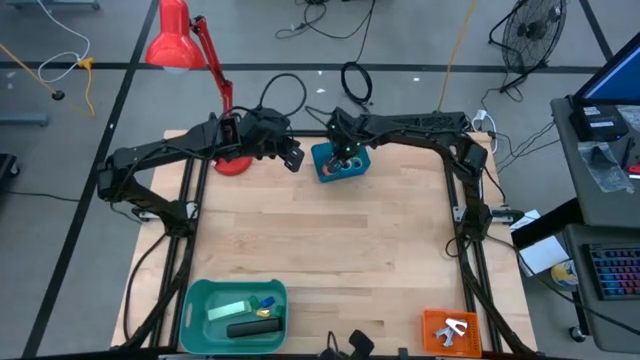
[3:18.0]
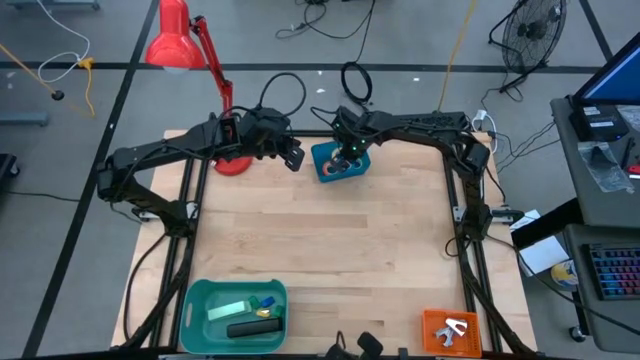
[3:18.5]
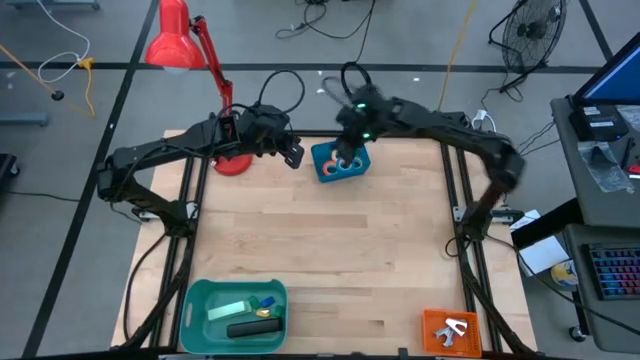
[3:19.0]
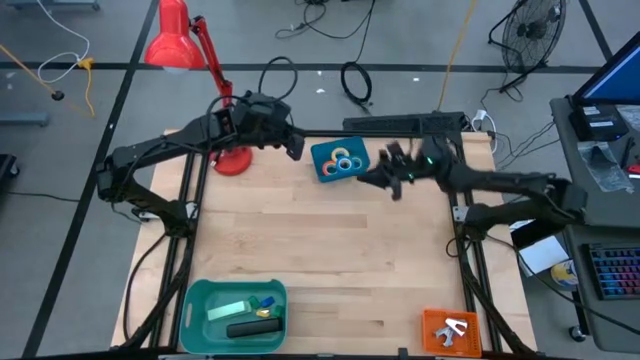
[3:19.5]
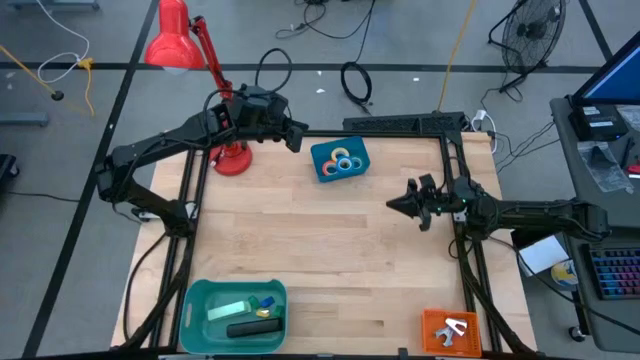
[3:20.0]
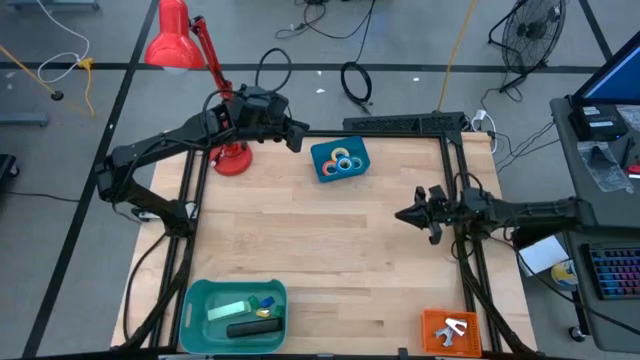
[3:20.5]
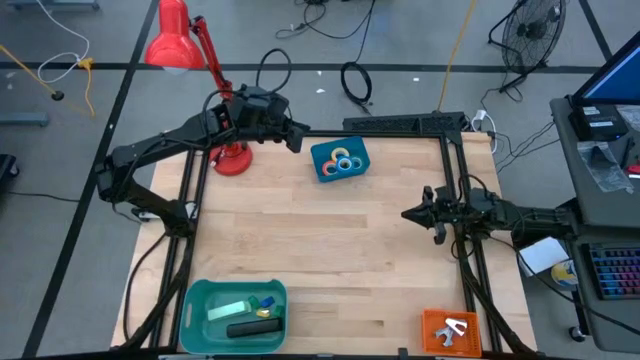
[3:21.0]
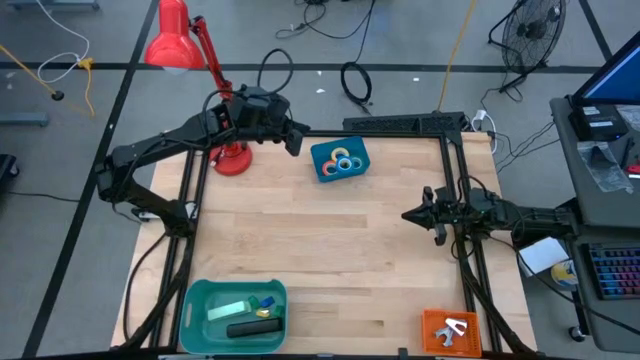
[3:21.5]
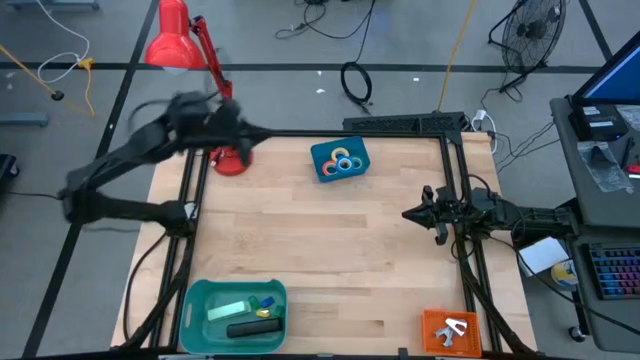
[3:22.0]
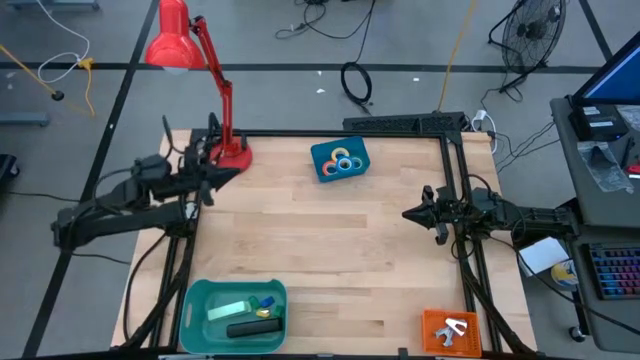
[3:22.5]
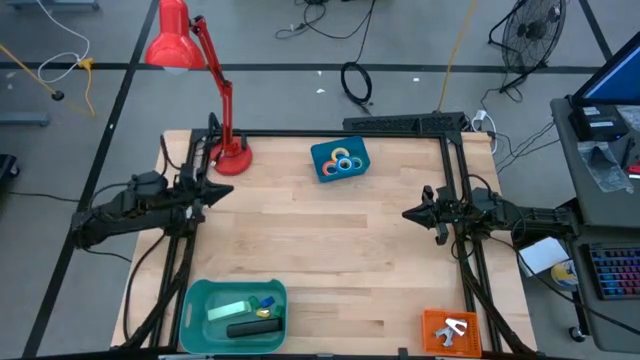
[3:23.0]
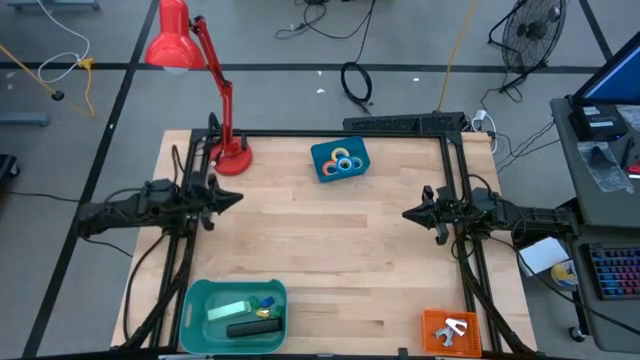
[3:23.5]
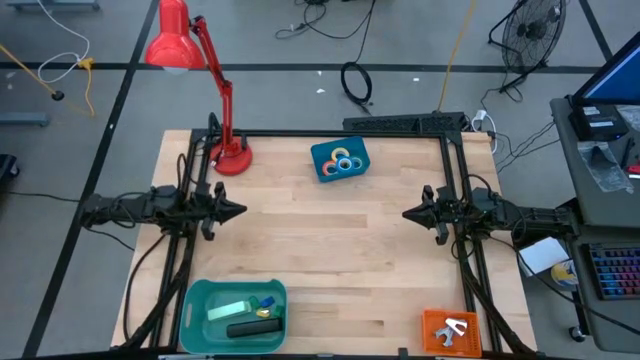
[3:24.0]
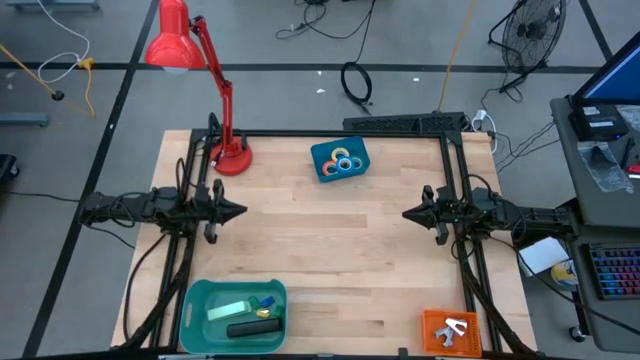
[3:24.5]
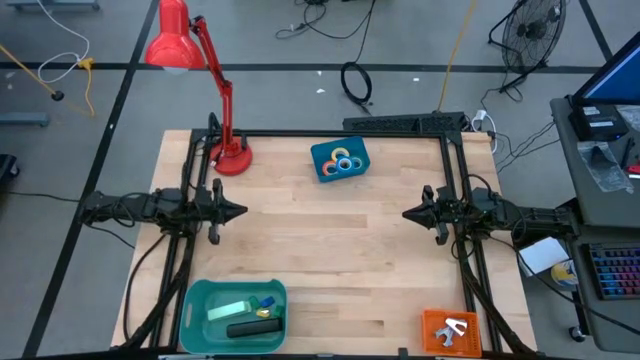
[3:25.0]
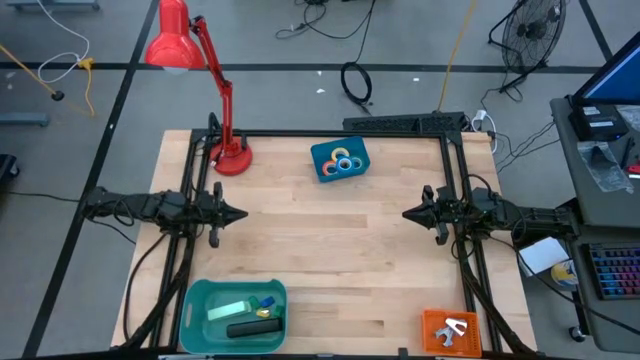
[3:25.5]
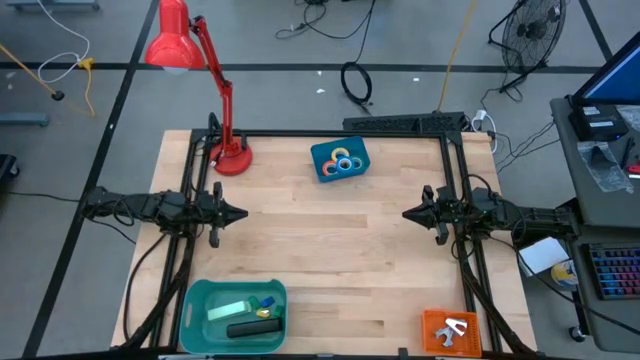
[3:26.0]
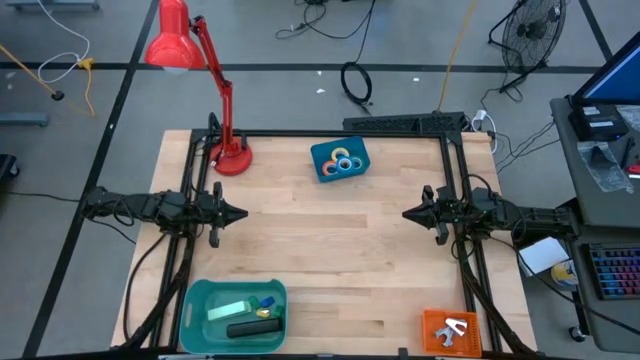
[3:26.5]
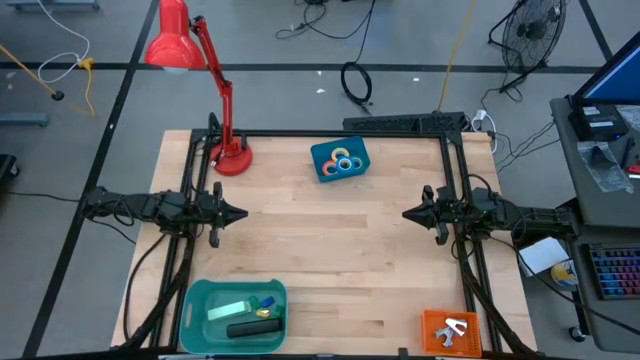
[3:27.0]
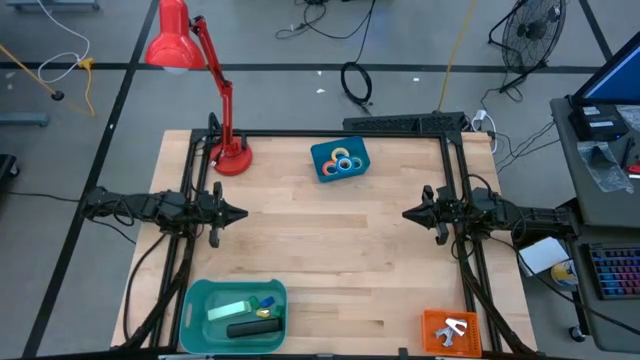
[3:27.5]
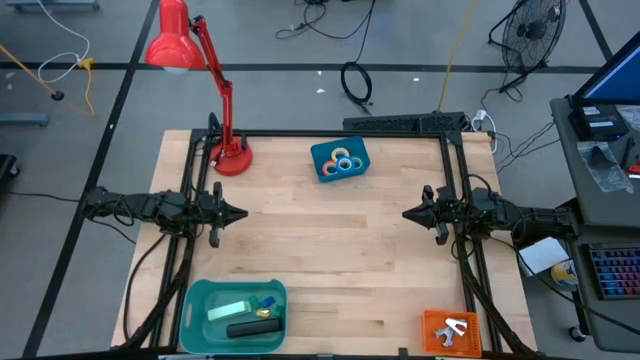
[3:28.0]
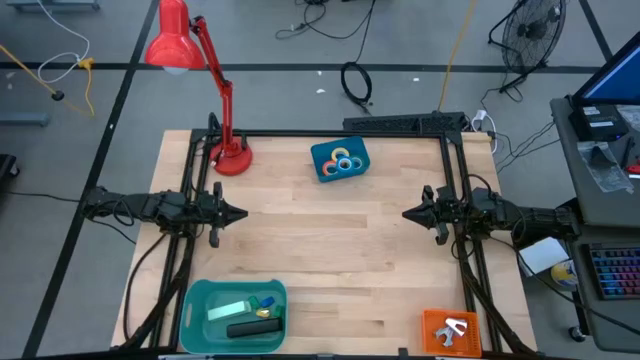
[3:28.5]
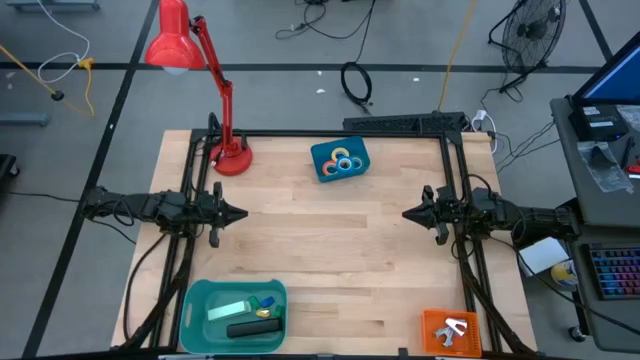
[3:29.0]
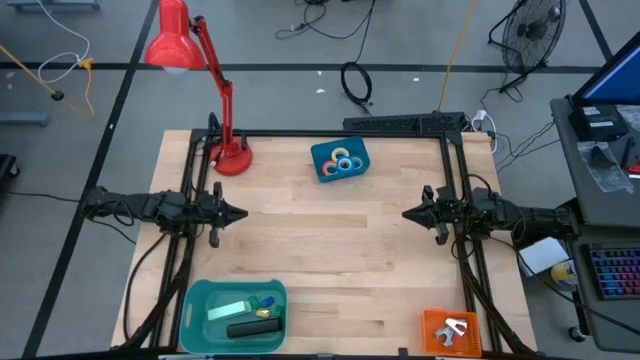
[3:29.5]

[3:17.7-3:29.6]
Task: Pick and place Stapler, Stapler remover, tape
Return to Home Position

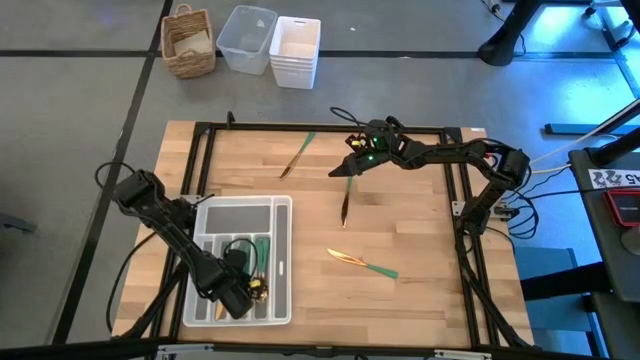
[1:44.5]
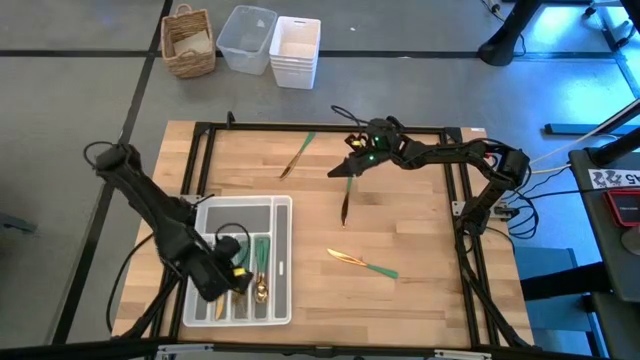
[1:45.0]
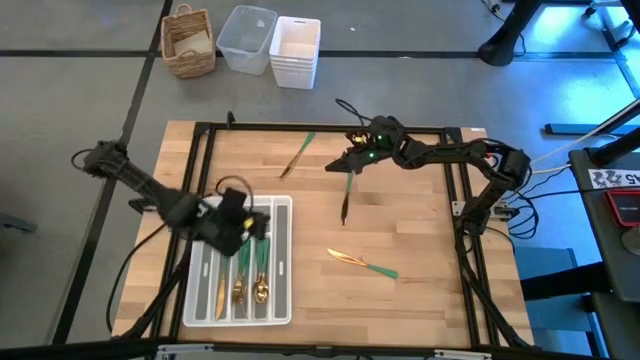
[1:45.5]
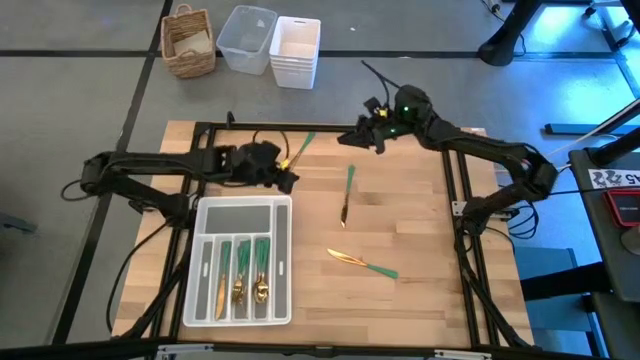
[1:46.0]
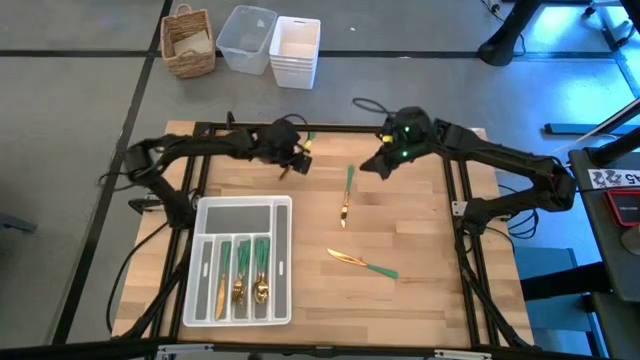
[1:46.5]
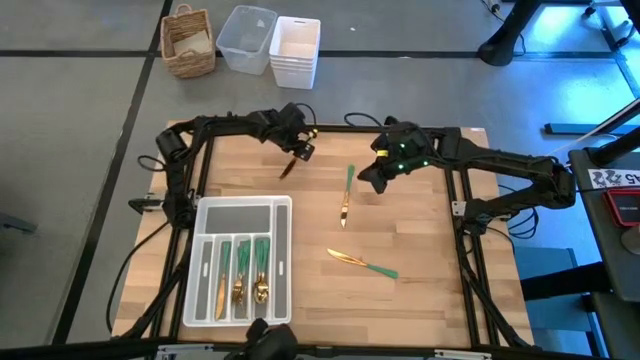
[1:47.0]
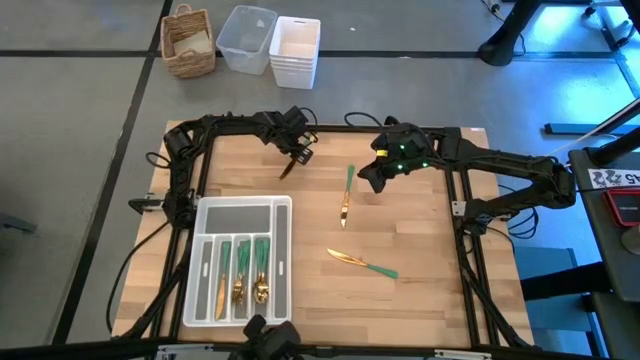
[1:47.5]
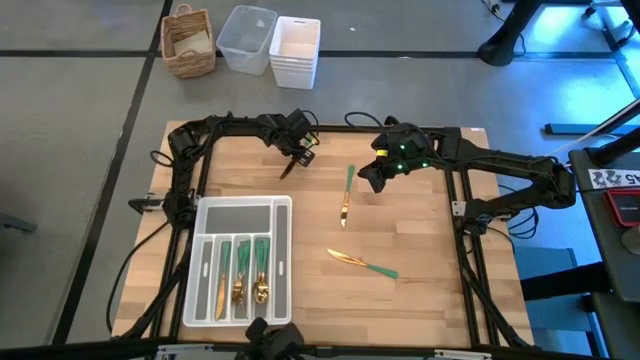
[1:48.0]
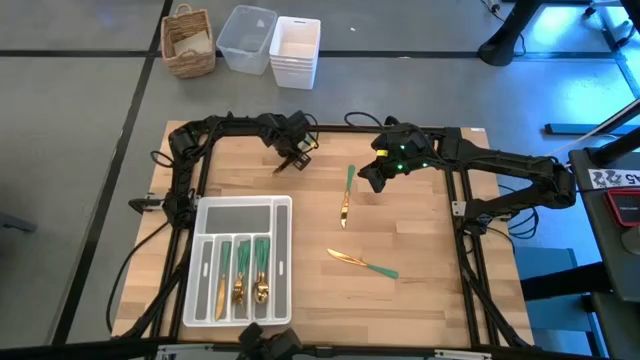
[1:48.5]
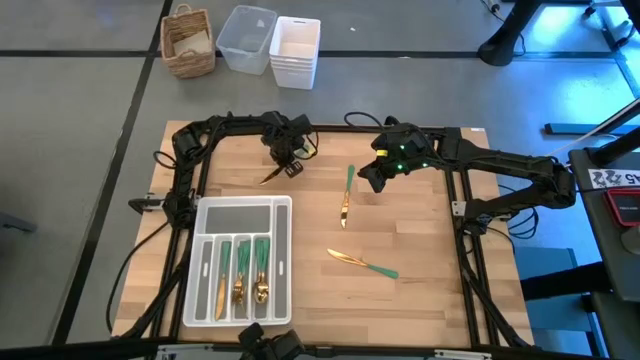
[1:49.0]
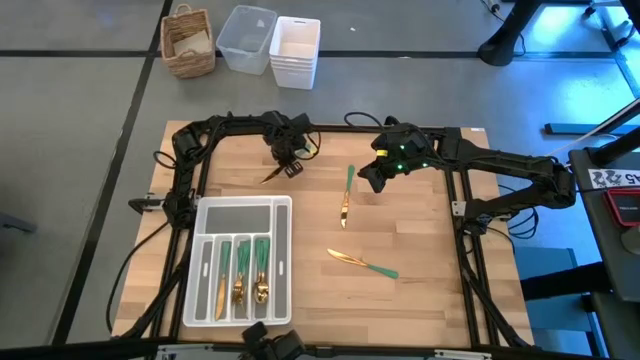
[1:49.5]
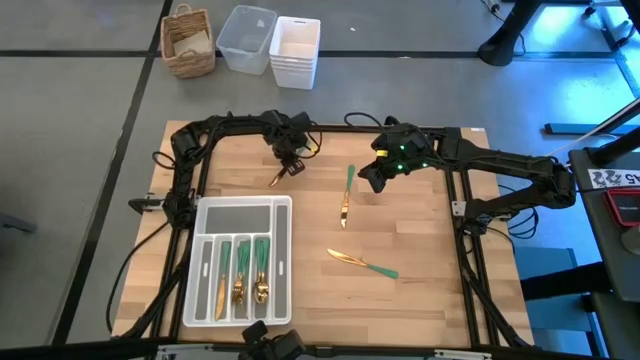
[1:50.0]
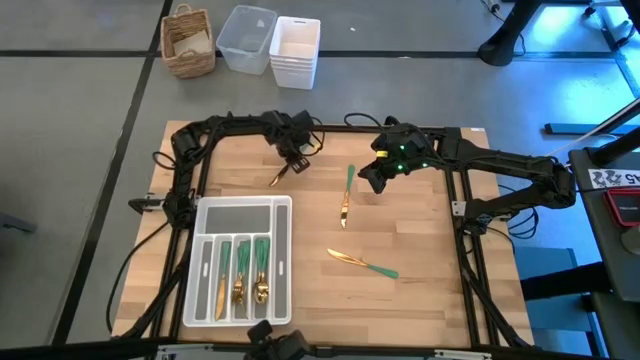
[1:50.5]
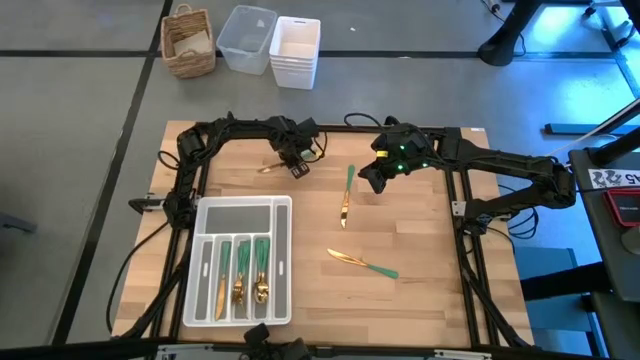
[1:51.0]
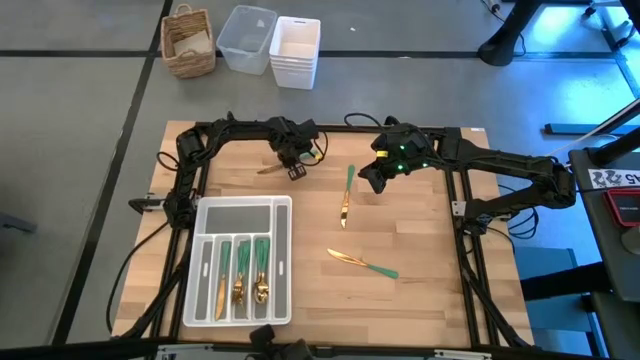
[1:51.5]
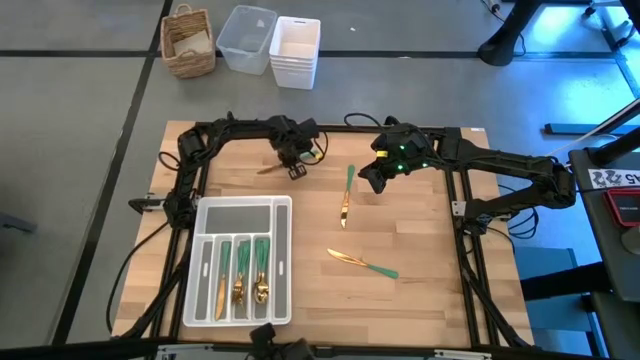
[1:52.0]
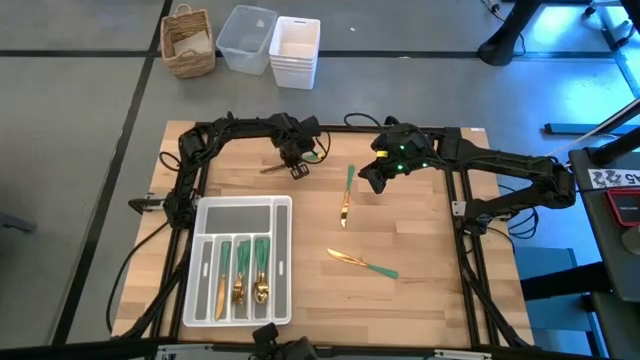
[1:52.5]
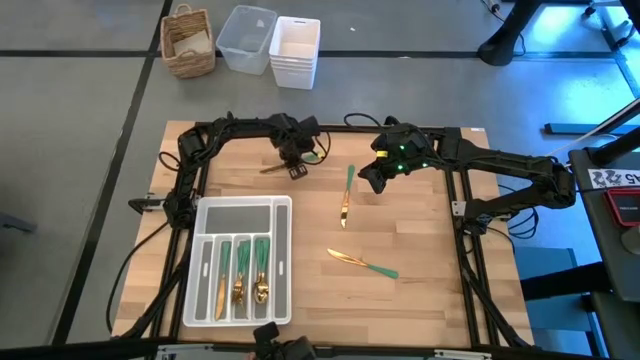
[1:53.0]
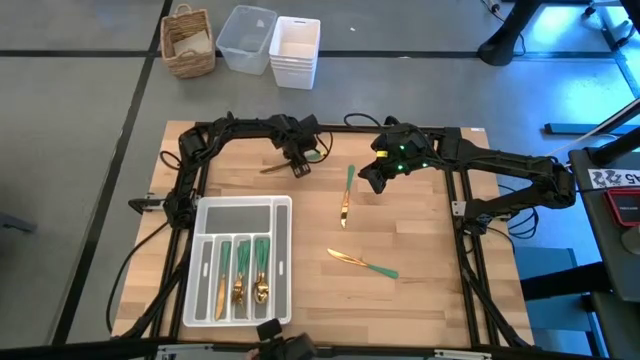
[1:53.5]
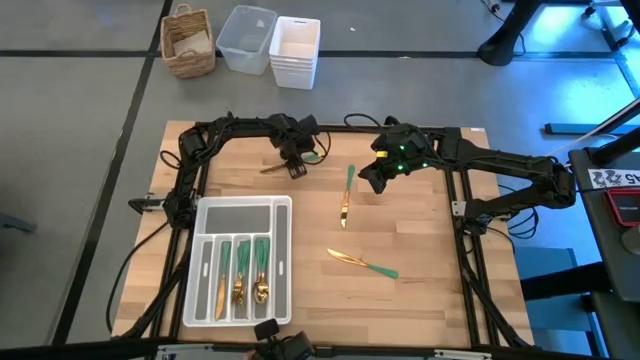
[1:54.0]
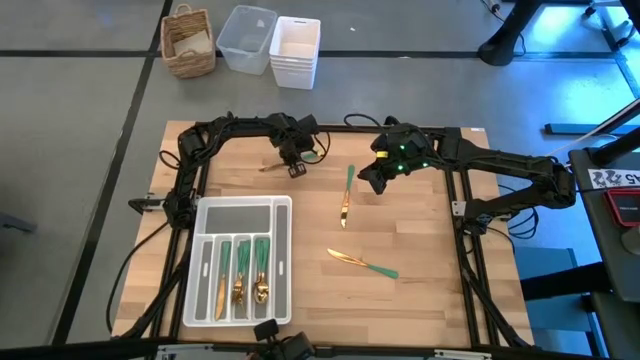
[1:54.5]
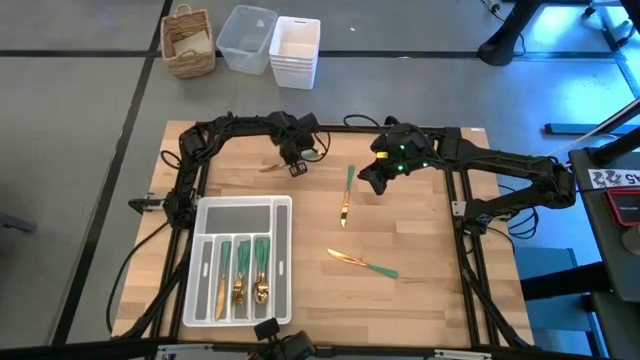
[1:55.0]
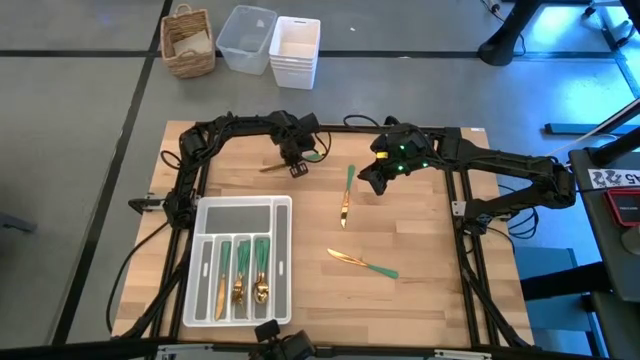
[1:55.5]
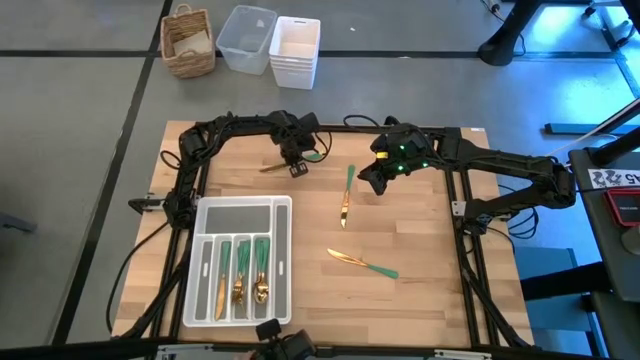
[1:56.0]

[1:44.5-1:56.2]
Task: Sort silverware
Put the green knife on the silverware tray
